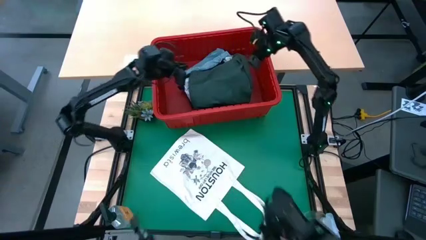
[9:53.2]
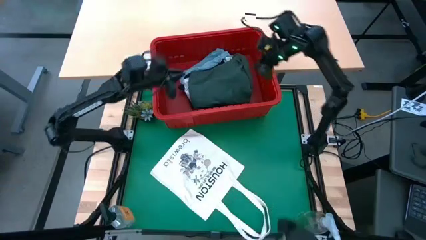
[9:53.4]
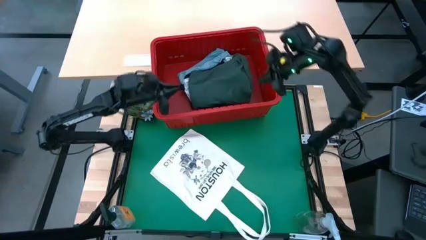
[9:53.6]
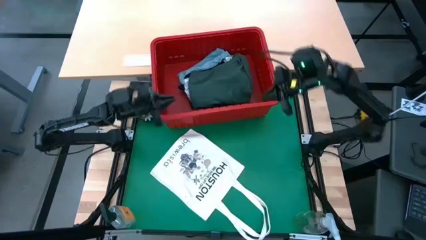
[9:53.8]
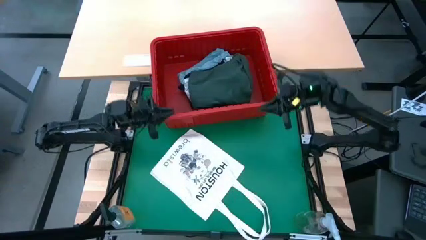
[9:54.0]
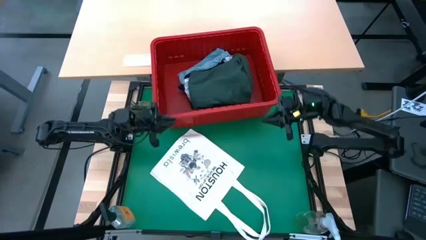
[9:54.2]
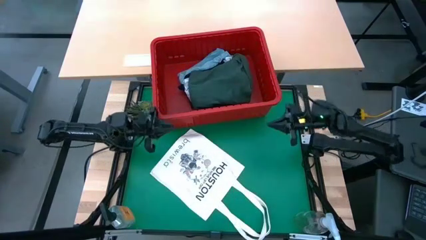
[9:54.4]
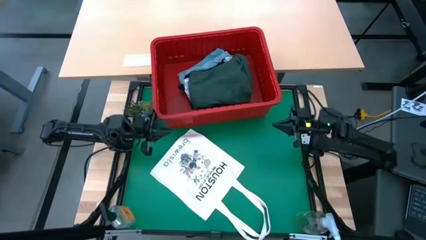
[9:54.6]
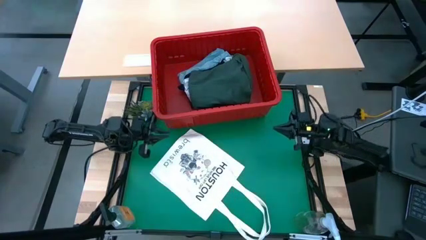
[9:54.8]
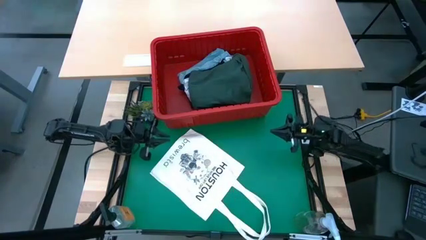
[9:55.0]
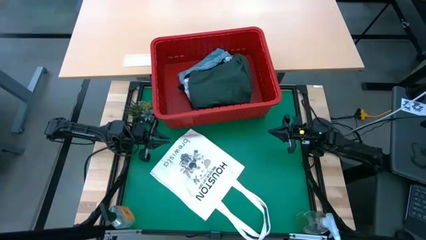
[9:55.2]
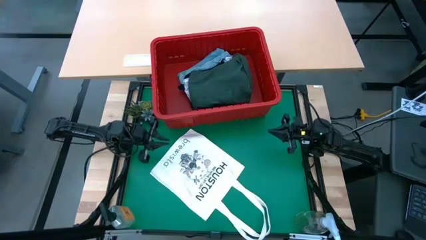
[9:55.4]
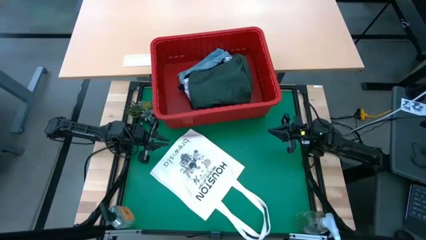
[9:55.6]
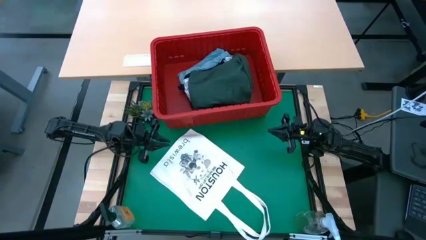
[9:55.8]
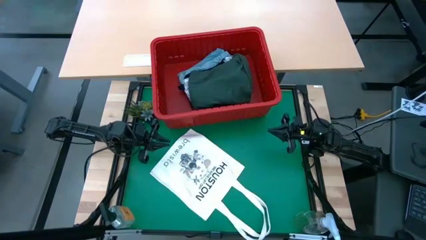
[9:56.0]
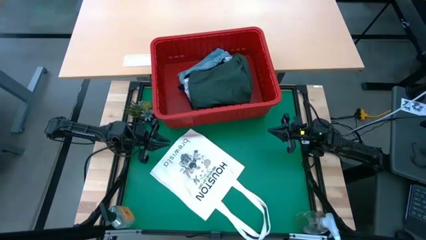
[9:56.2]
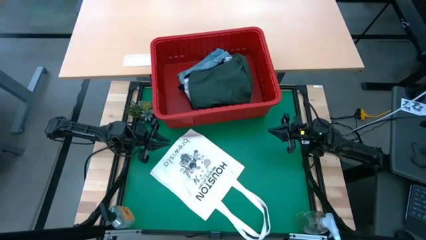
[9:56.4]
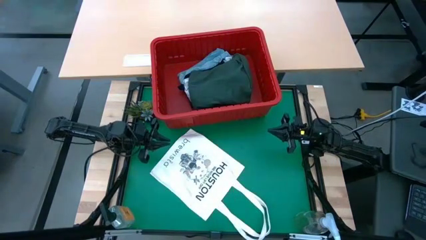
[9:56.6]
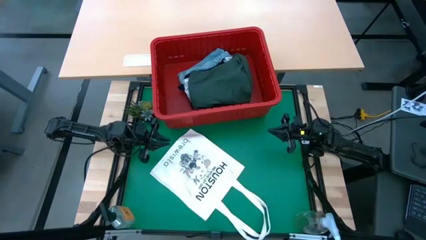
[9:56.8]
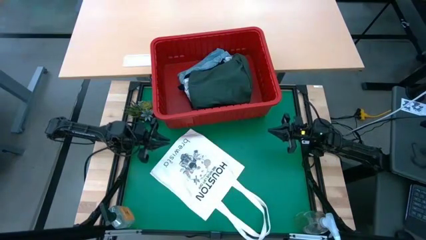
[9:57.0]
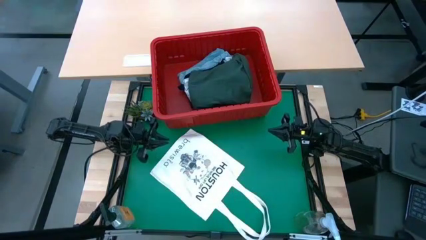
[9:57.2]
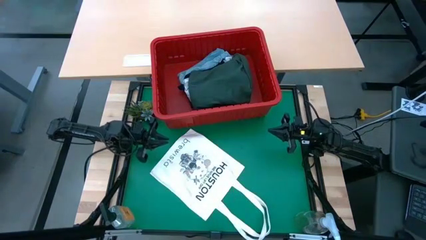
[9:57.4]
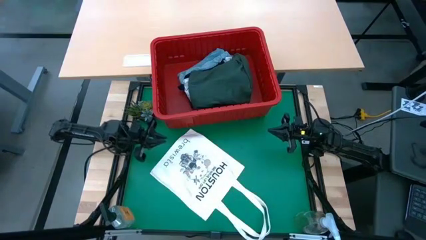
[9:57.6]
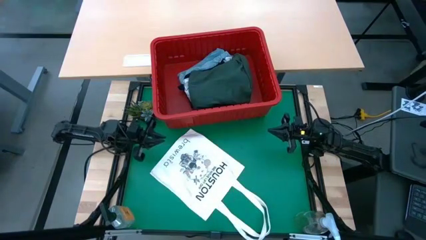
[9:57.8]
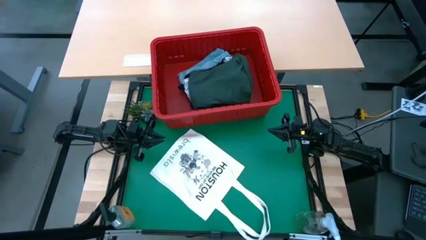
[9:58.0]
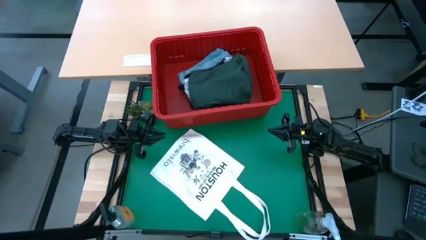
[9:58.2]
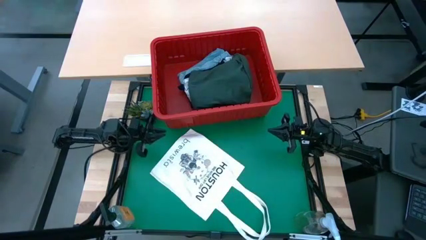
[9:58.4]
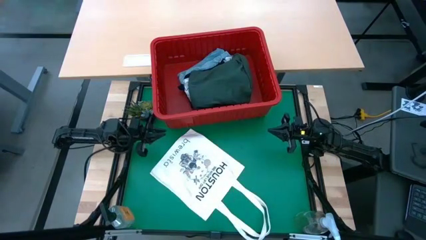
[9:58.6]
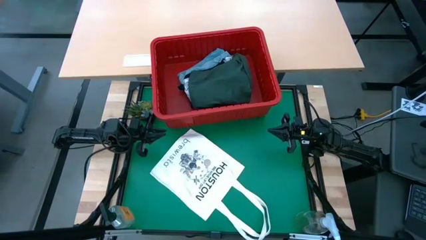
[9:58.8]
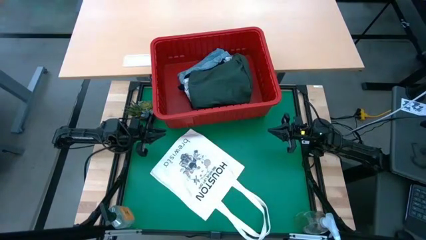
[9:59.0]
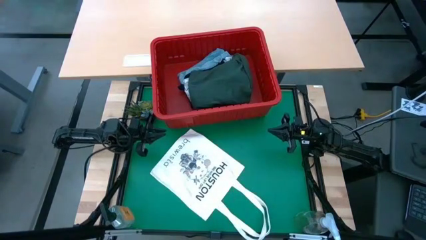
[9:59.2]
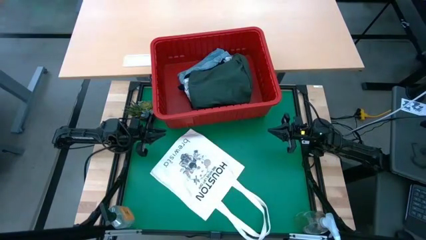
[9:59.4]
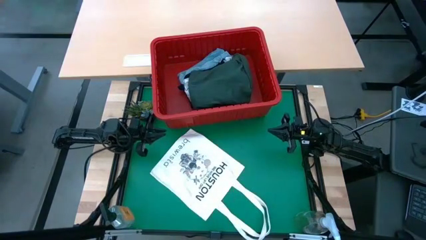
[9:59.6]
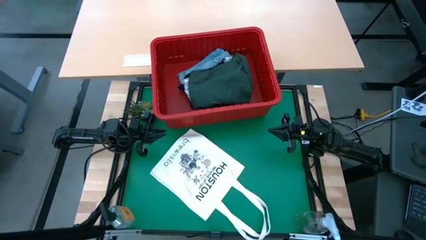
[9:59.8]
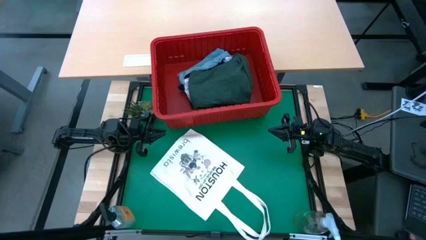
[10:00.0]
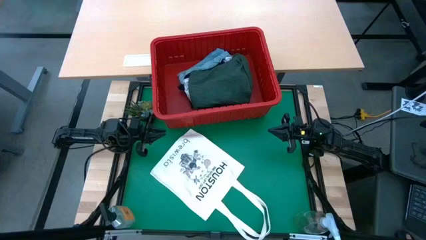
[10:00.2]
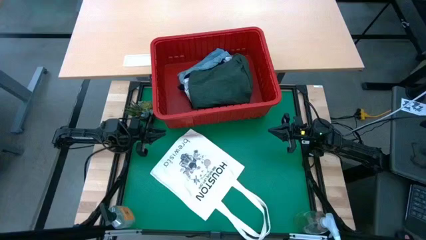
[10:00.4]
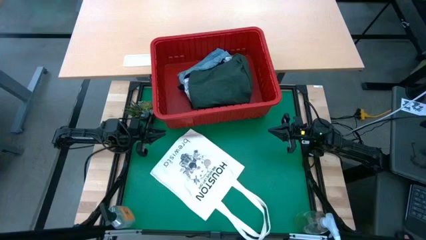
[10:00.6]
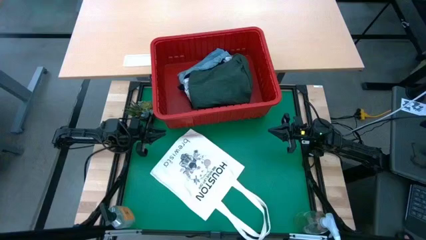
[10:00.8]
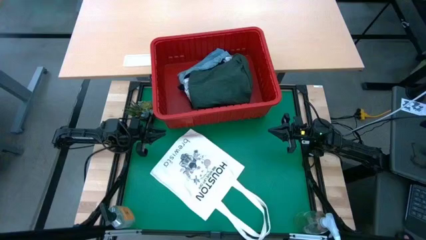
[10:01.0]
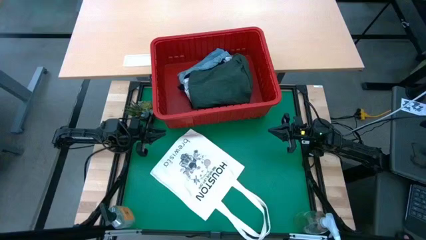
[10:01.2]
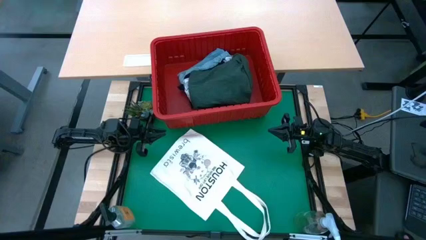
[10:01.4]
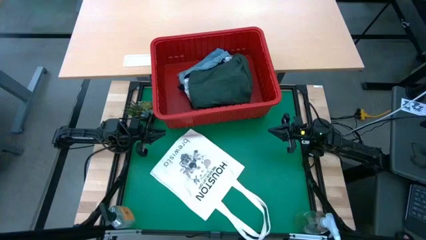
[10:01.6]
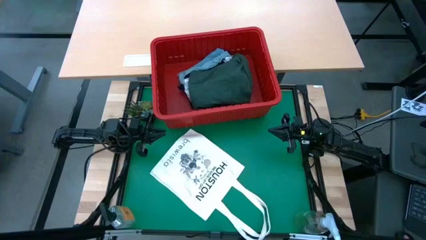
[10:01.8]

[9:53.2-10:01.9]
Task: Fold laundry
Return to home position

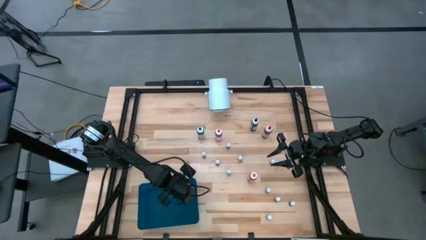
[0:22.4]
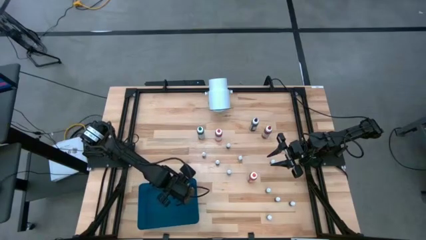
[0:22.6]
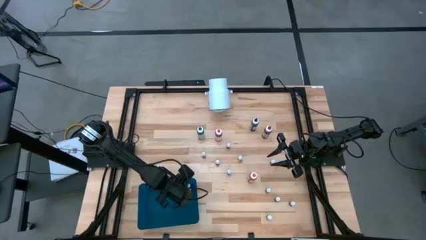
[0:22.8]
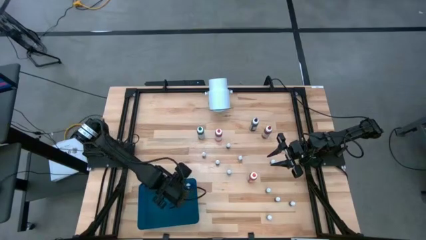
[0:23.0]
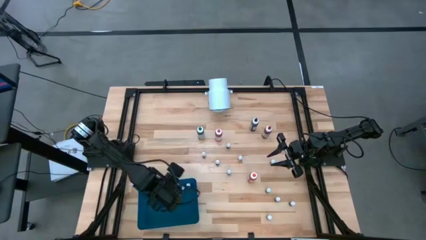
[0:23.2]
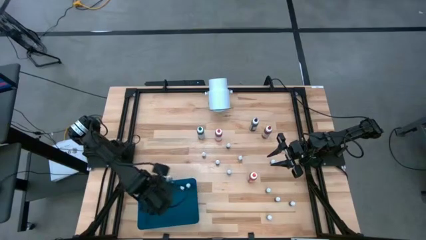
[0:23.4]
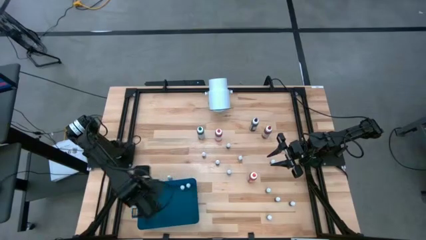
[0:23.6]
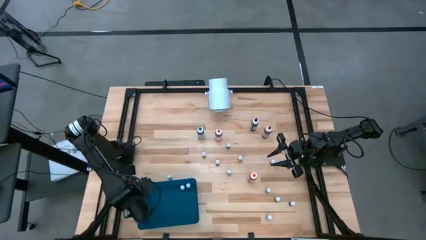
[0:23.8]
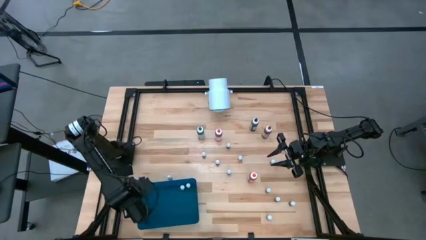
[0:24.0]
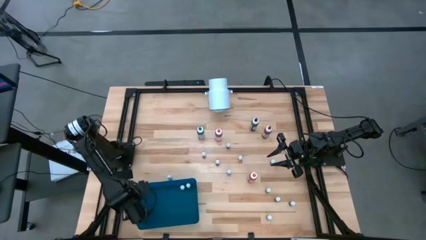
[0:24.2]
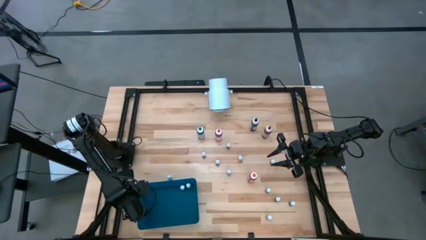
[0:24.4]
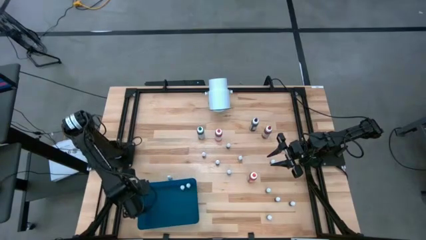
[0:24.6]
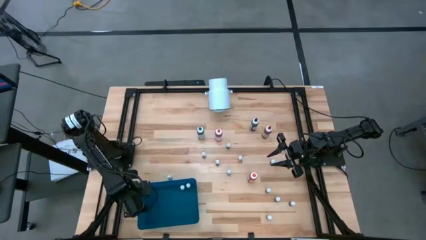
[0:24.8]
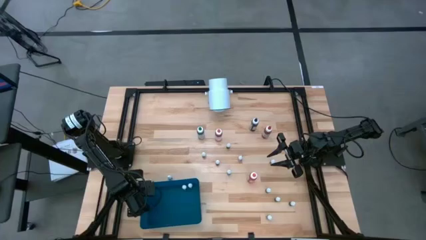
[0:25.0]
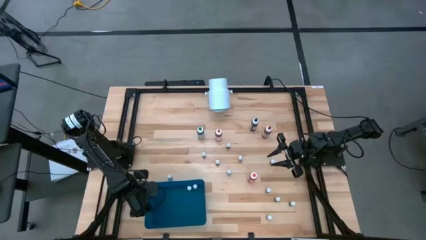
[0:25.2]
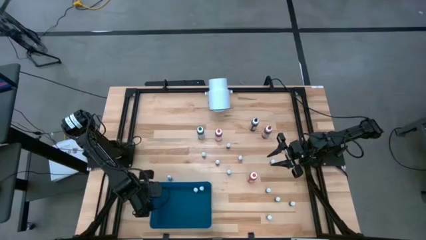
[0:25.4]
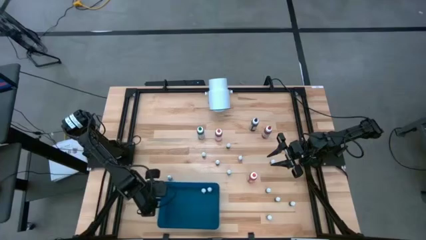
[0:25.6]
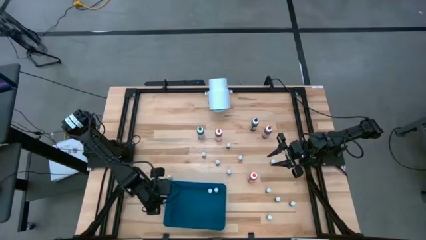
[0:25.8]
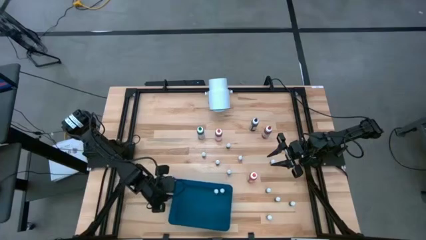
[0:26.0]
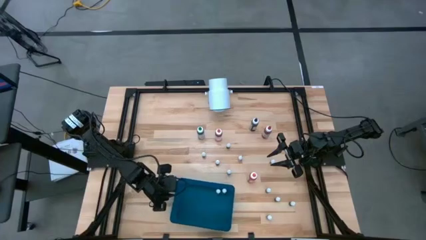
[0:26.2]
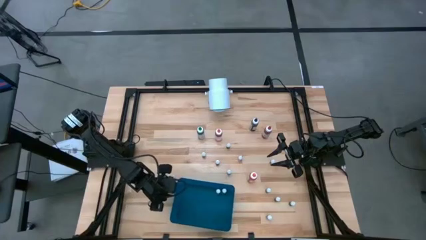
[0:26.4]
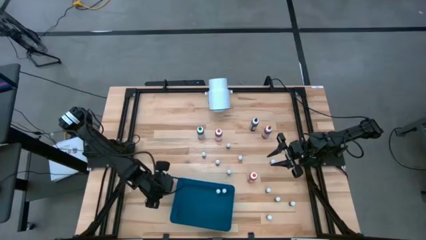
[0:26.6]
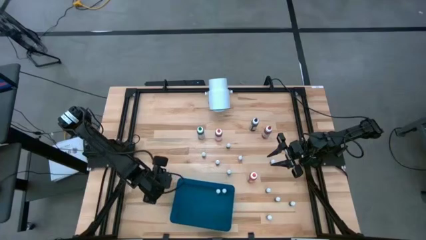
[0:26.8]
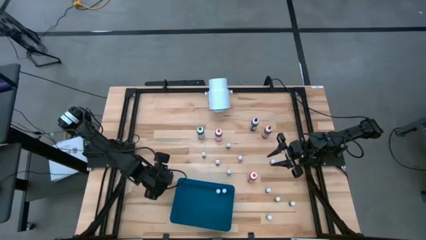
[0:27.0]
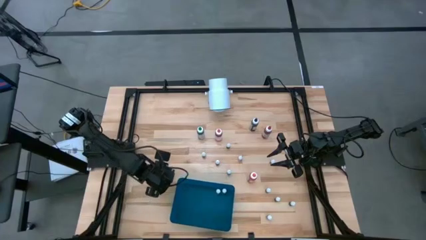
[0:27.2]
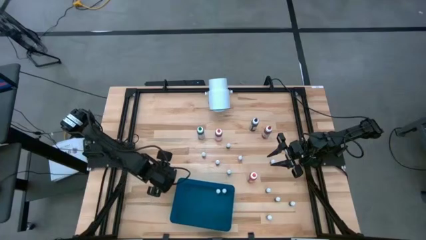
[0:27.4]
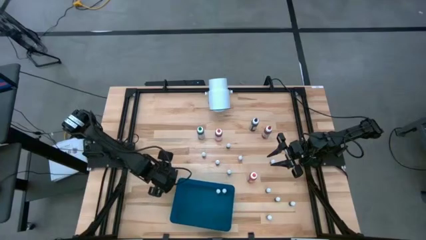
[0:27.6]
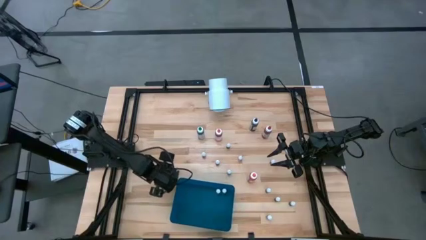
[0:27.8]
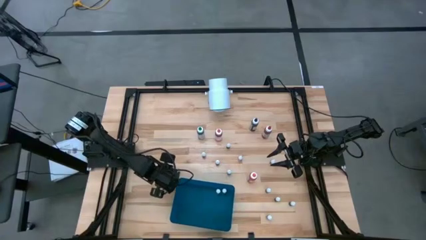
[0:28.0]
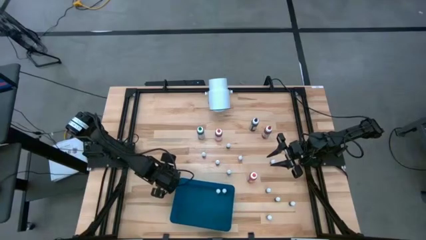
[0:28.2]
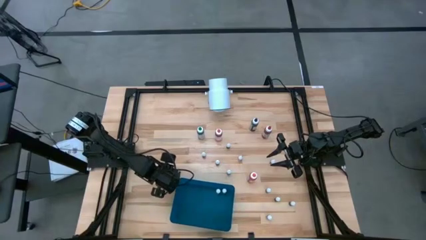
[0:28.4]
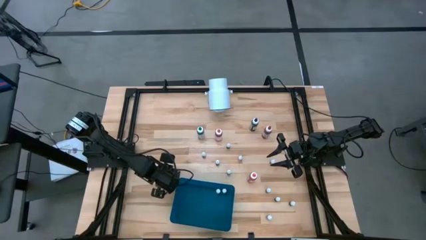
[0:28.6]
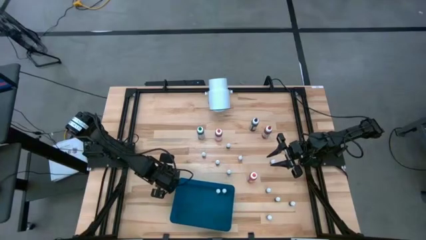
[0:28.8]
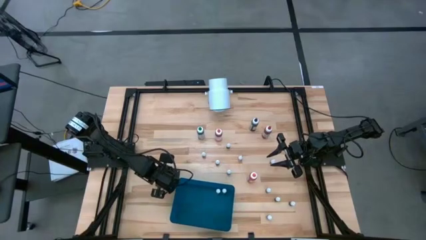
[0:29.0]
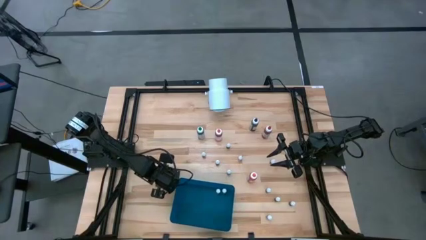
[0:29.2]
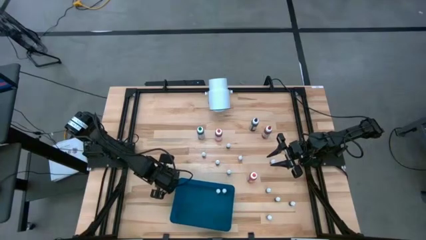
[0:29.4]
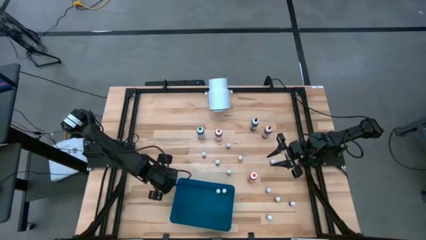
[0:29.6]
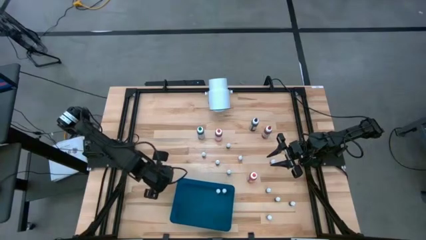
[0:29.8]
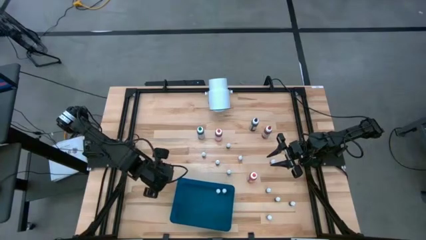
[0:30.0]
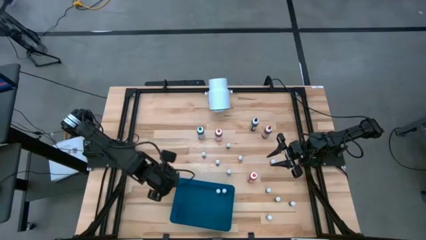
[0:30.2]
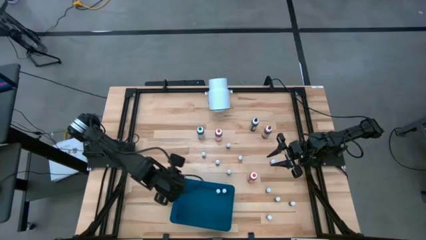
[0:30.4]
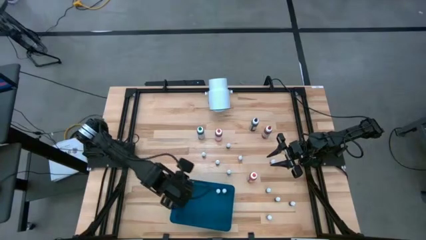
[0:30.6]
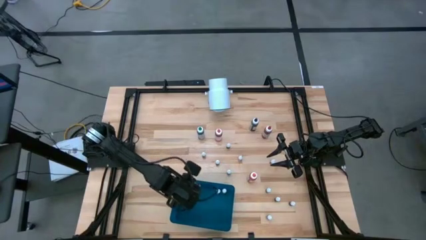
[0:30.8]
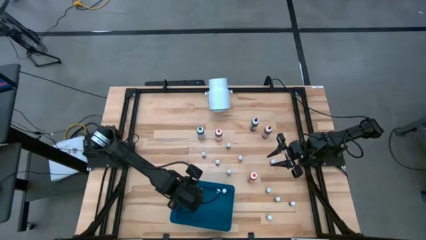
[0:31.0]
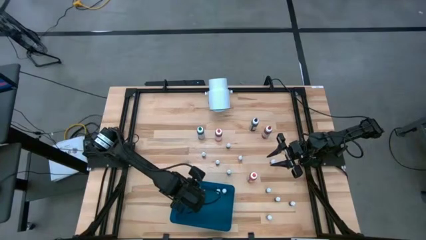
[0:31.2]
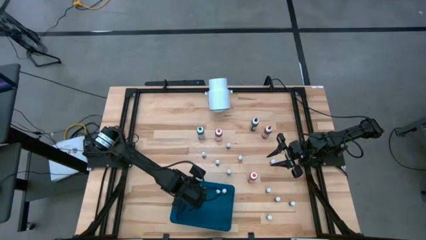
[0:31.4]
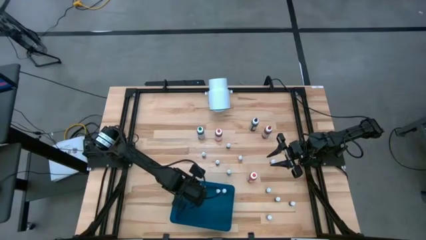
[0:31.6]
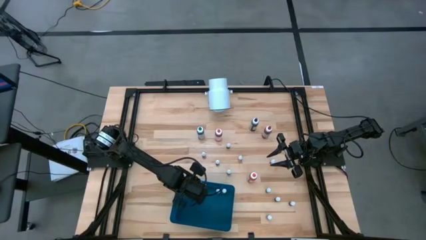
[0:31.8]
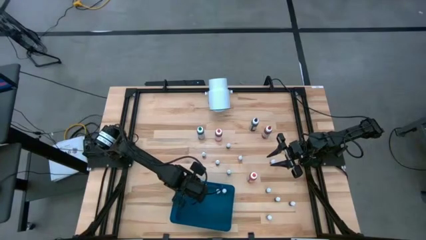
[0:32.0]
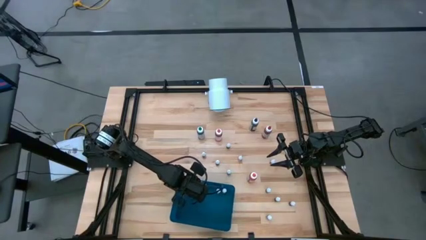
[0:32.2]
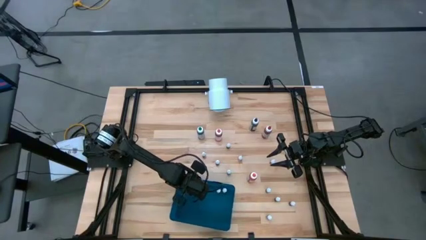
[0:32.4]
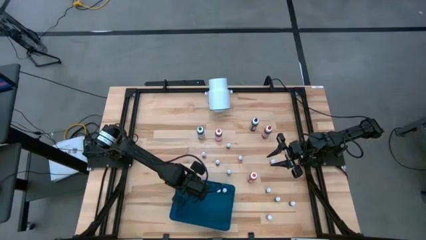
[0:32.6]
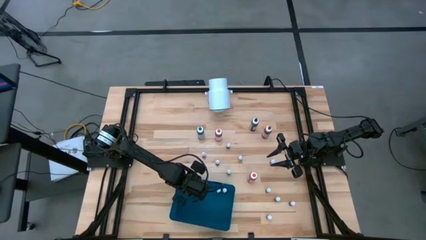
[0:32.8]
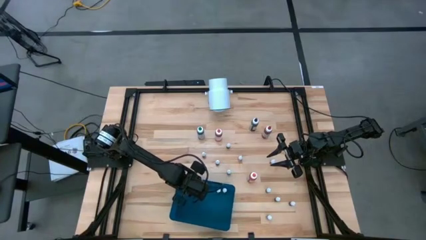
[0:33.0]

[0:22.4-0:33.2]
Task: Pick & Place food coloring
Put the small black food coloring bottle into the blue bin
